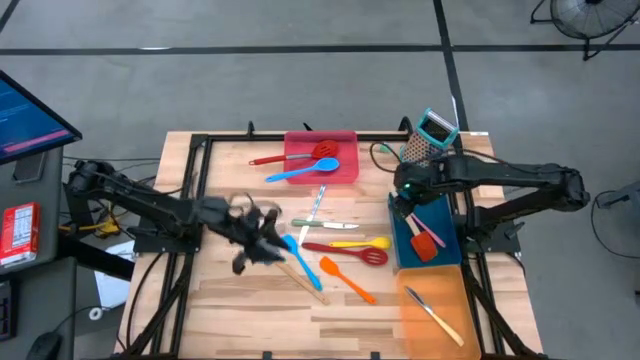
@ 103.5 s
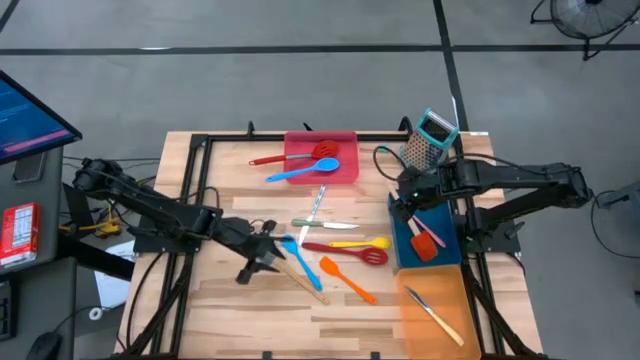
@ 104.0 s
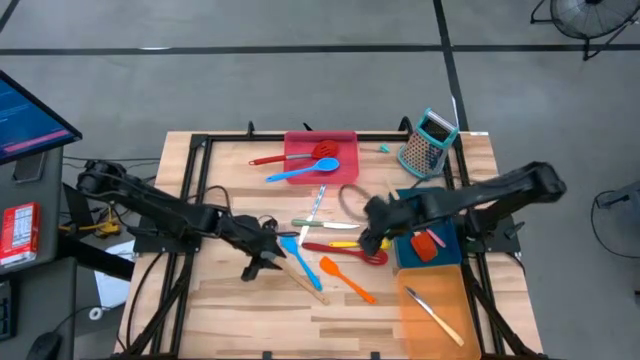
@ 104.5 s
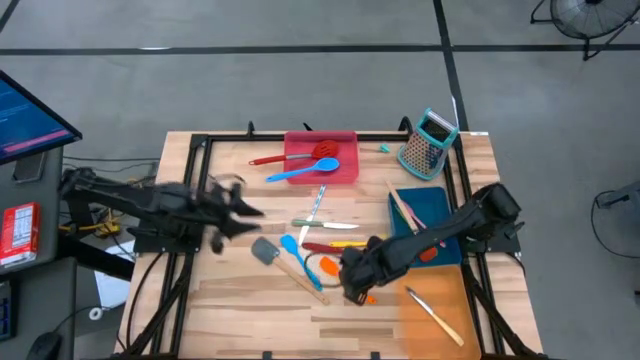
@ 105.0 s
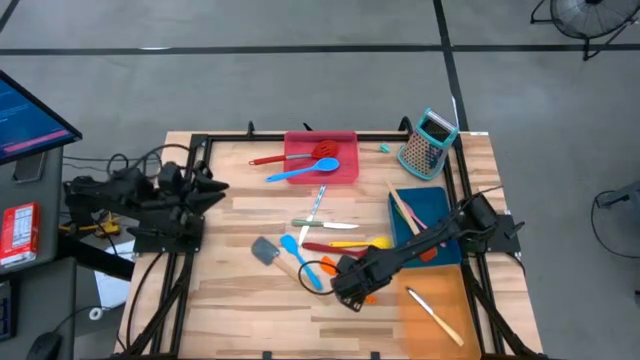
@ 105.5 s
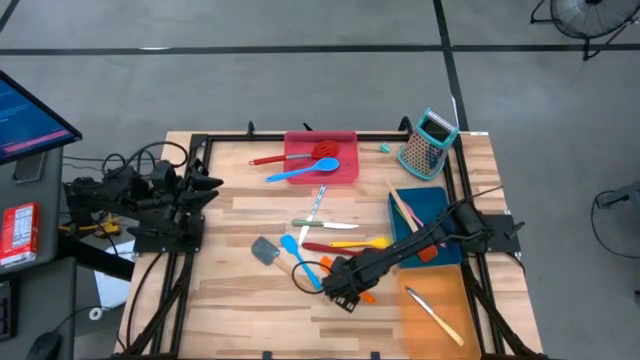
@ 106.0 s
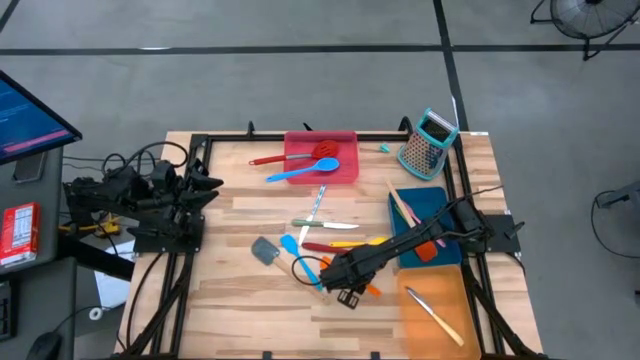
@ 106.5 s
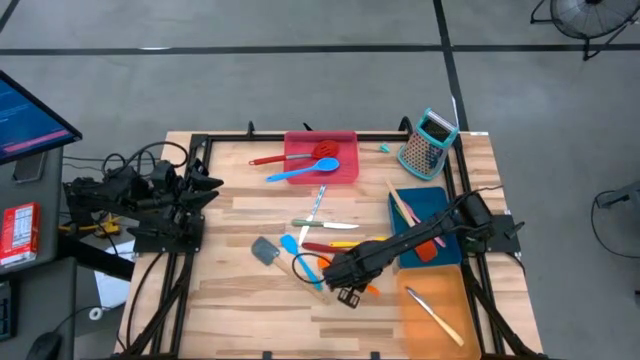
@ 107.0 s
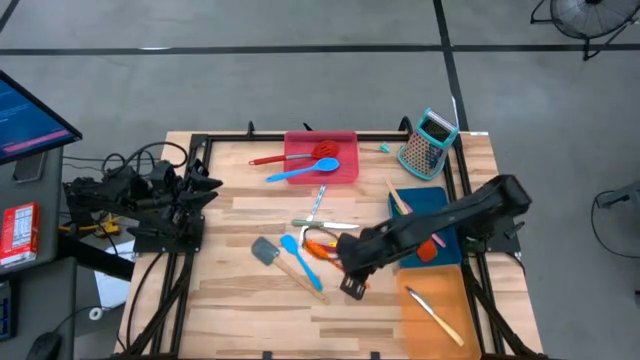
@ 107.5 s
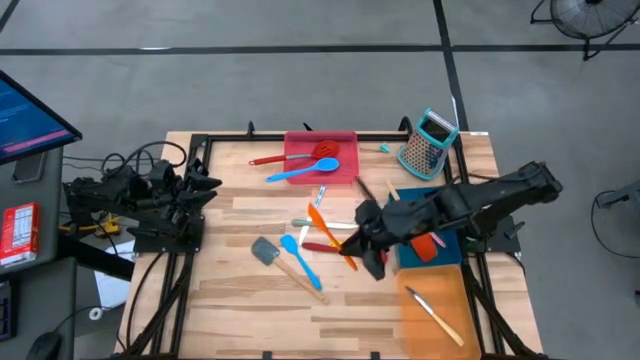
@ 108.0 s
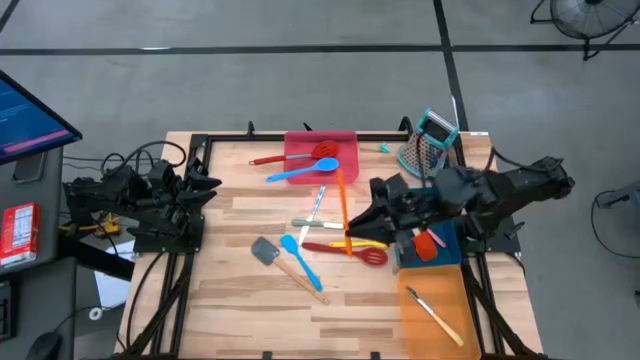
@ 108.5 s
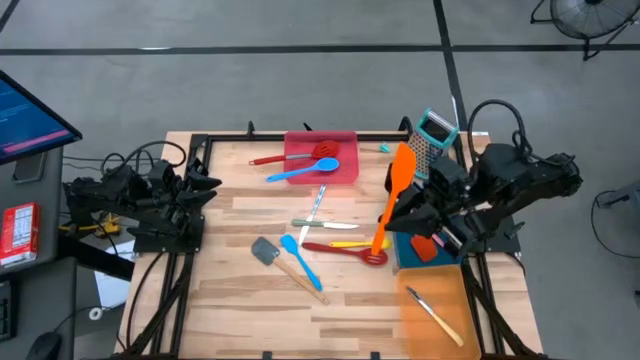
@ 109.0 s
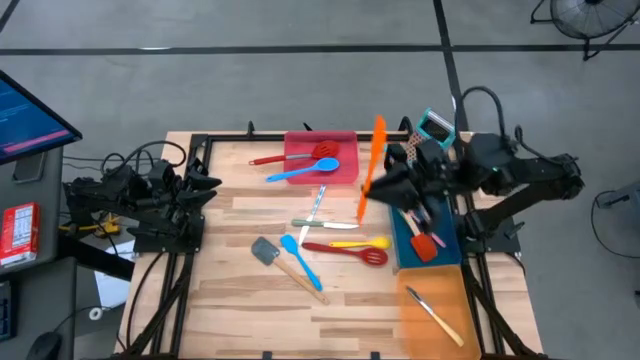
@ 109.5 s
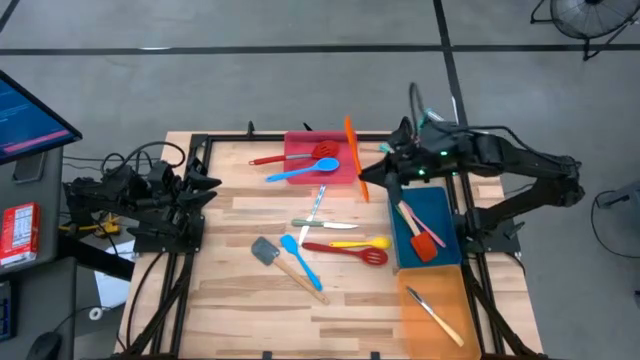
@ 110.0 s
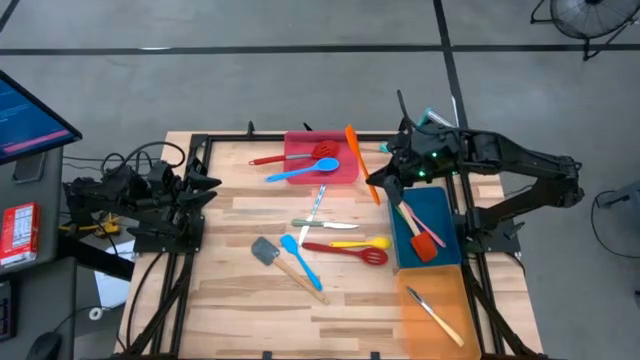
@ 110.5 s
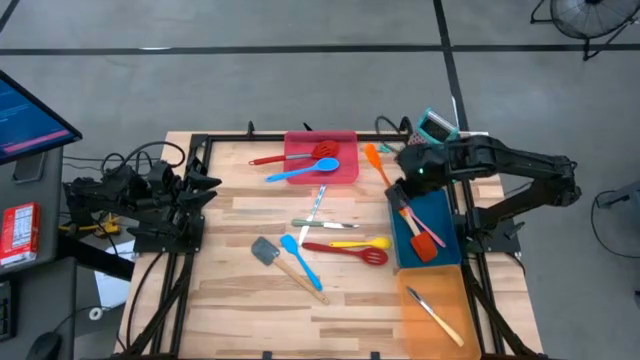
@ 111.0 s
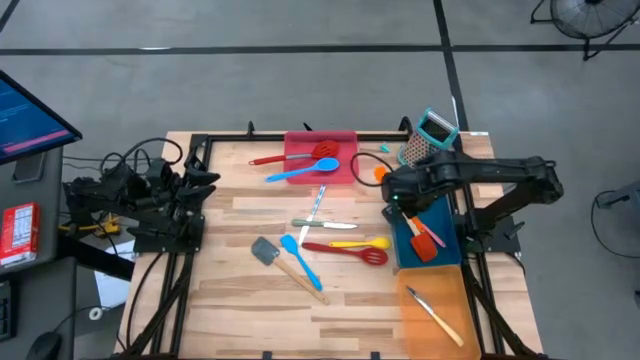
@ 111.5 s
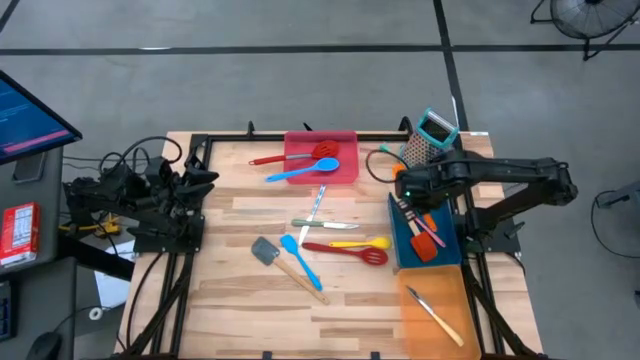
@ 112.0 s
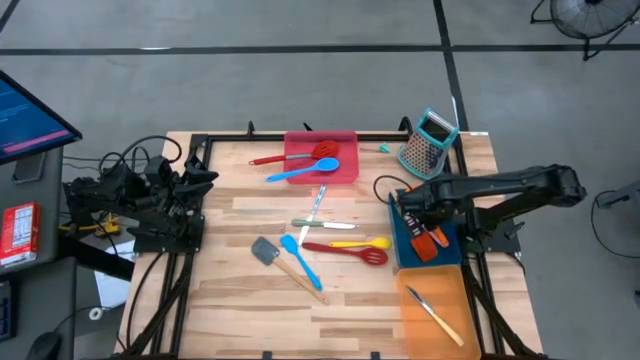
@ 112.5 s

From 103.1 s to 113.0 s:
Task: Pick & Place Kitchen Items
Put the orange spatula into the blue bin

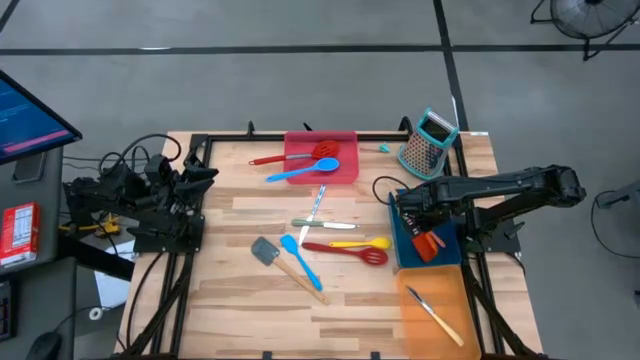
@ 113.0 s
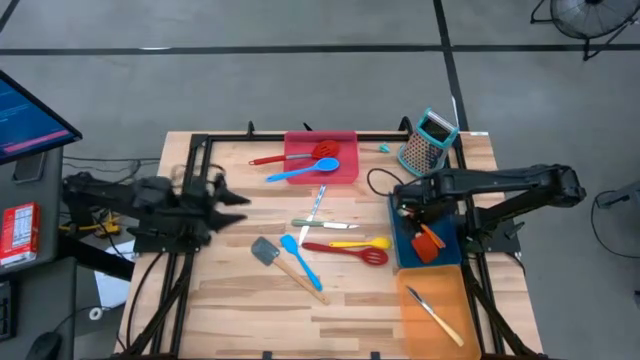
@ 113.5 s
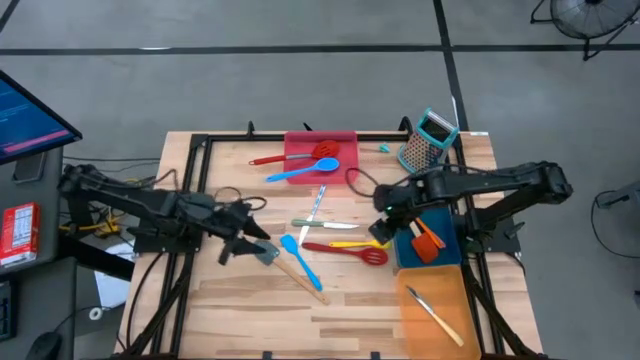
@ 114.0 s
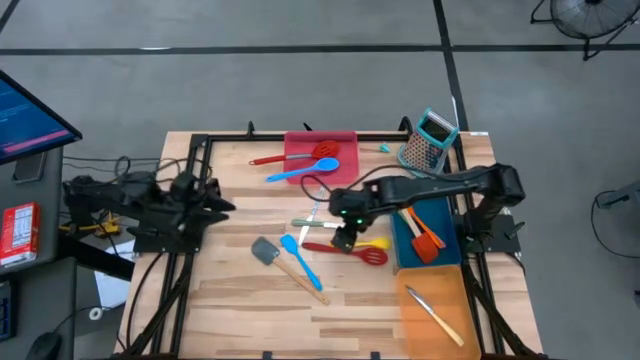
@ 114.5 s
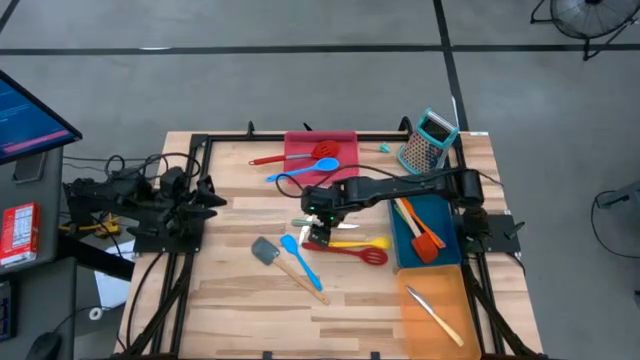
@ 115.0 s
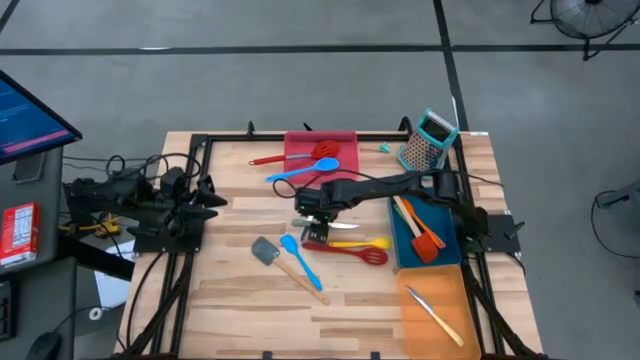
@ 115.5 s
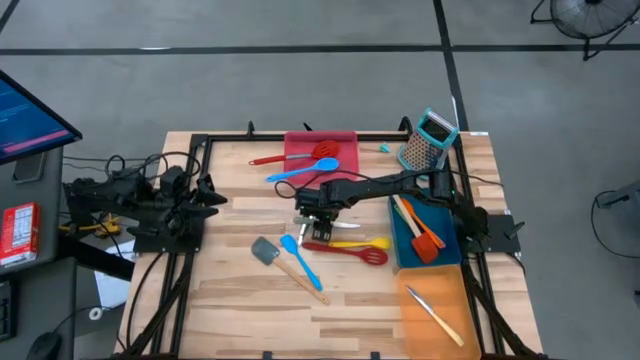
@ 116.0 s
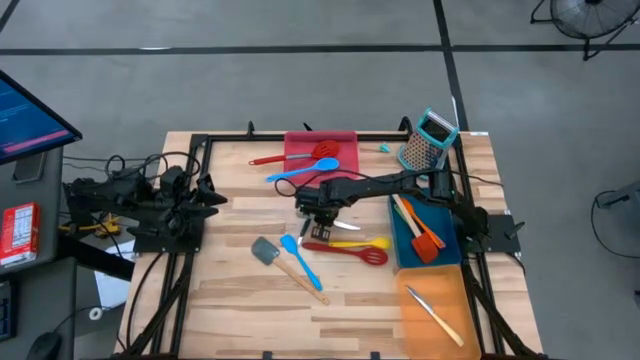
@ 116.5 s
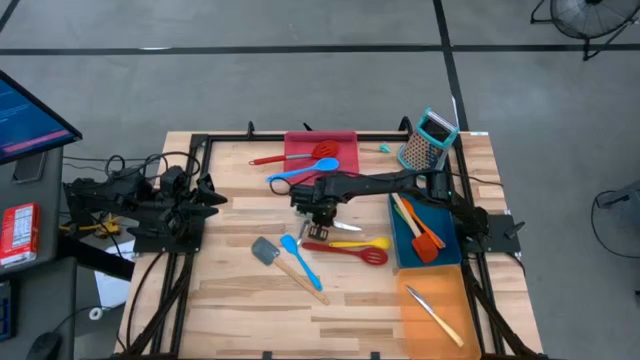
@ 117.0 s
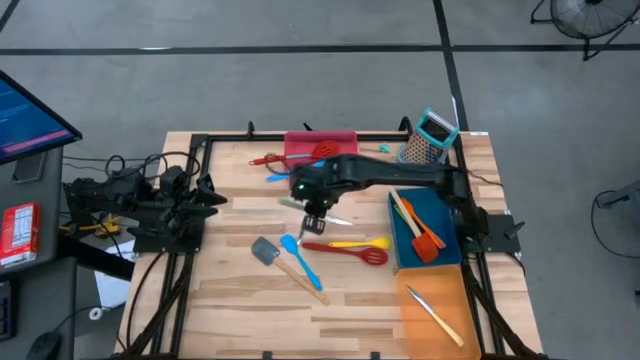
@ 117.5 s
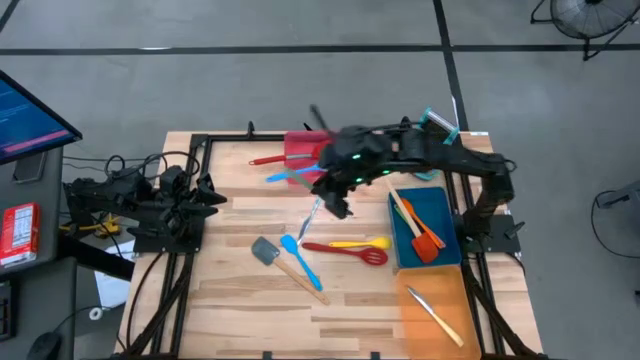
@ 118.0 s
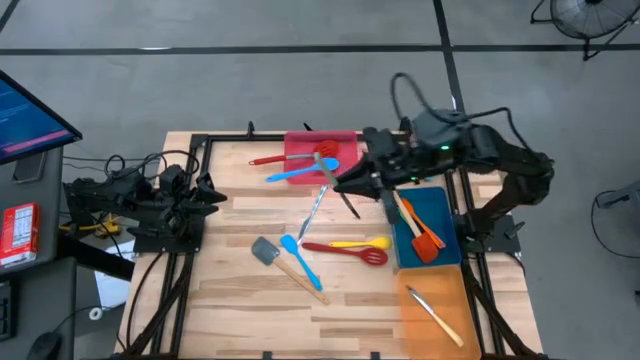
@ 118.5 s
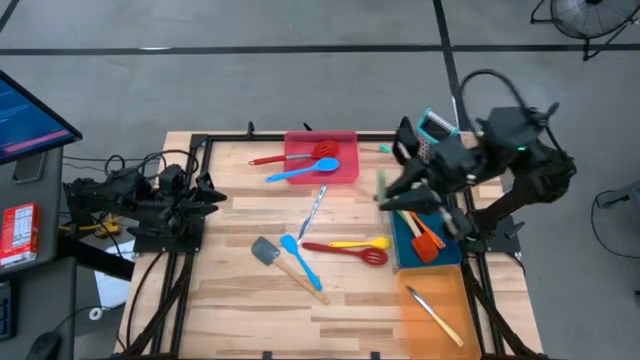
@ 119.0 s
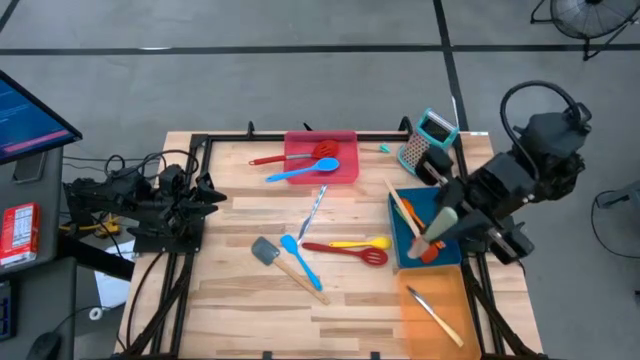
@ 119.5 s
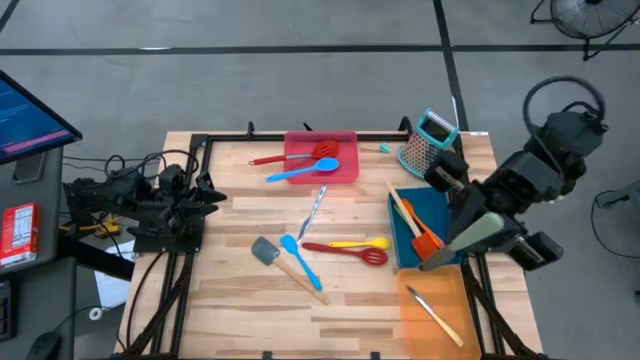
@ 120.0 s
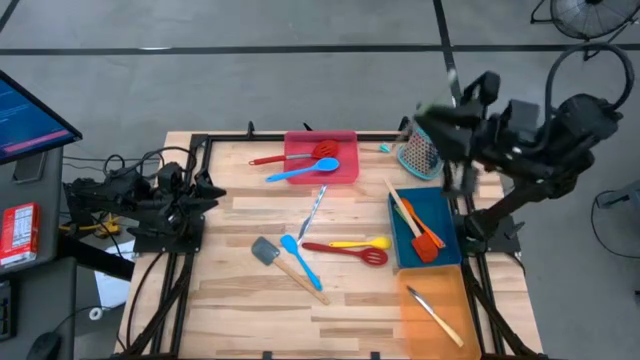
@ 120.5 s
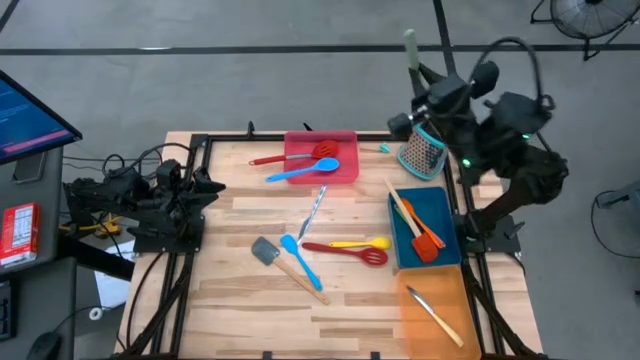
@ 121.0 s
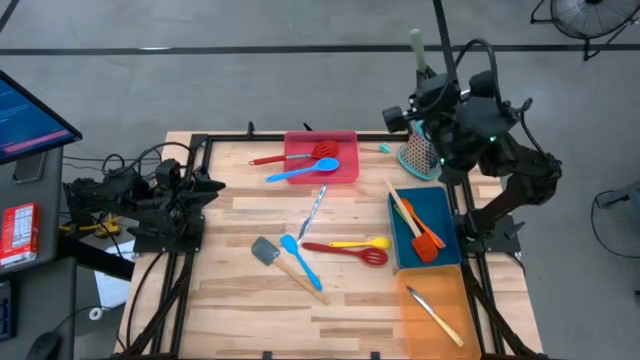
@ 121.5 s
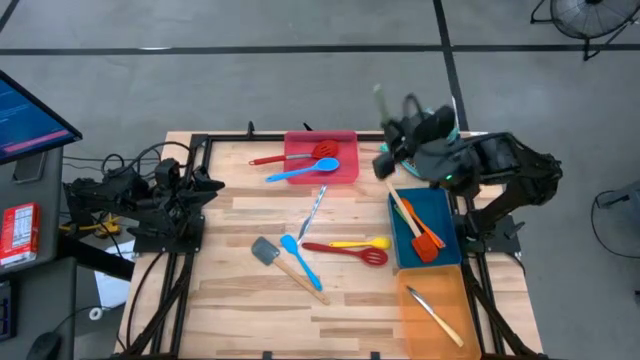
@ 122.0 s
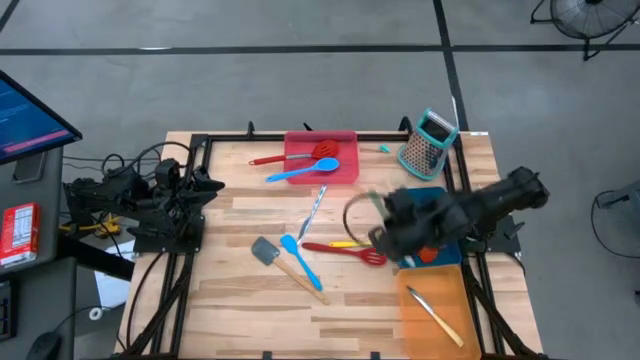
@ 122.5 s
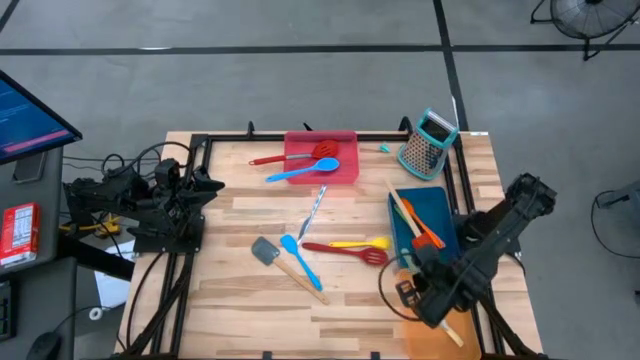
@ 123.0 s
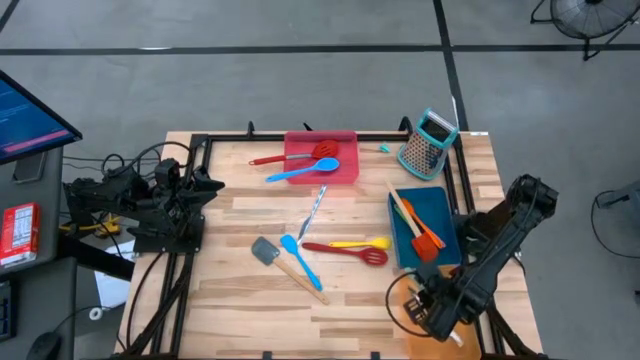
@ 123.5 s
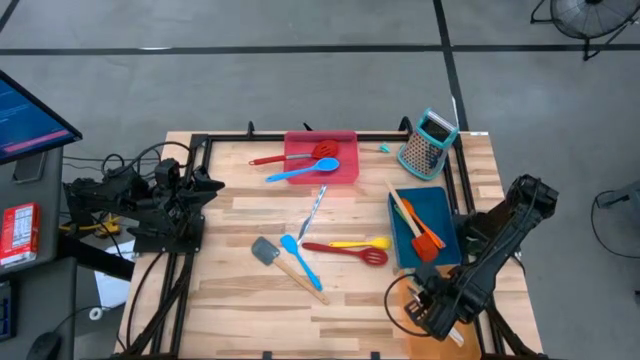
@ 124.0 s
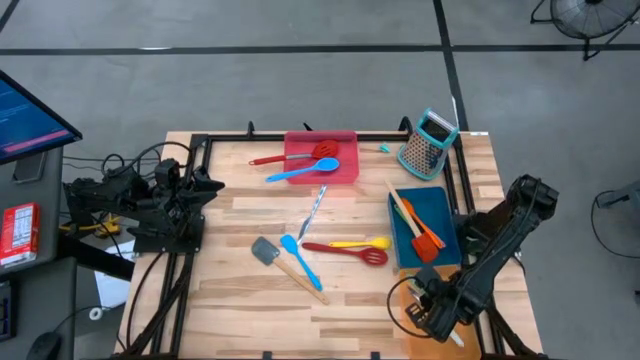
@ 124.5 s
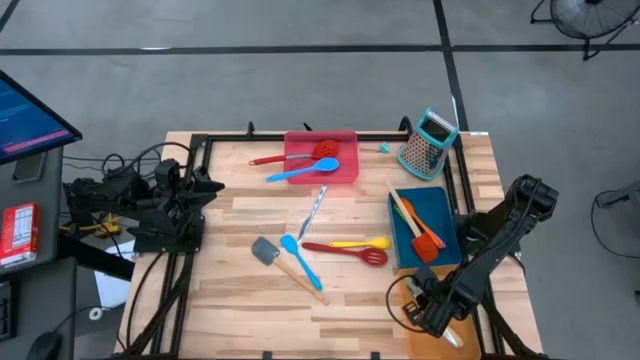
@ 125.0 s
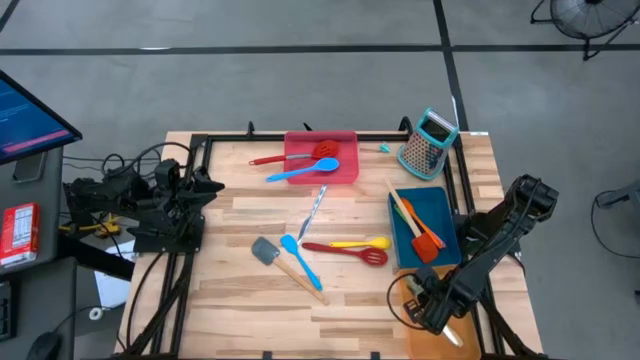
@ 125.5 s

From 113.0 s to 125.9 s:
Put the green kitchen knife into the orange bin
